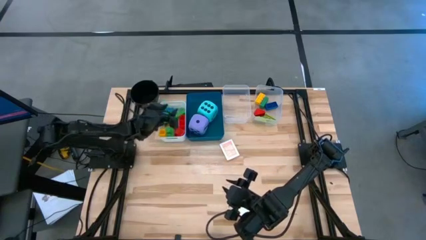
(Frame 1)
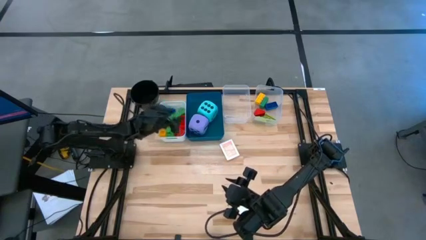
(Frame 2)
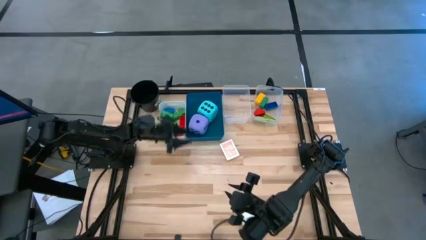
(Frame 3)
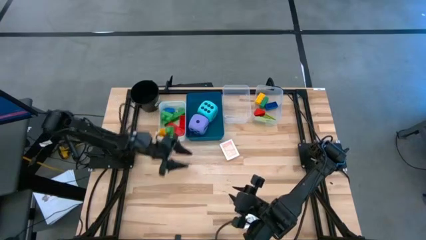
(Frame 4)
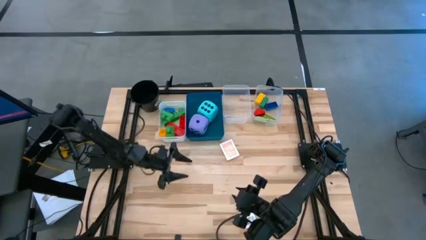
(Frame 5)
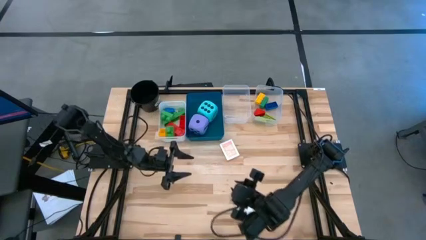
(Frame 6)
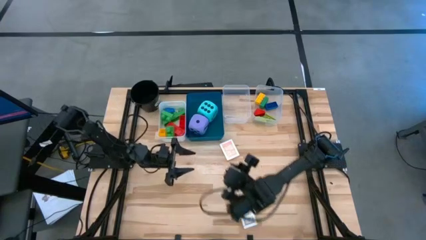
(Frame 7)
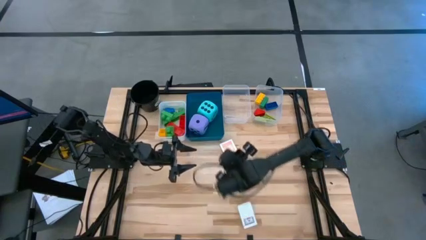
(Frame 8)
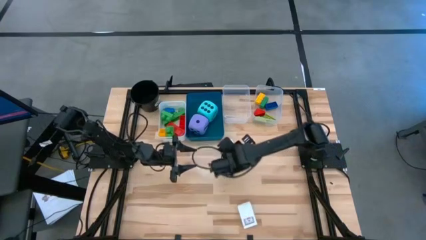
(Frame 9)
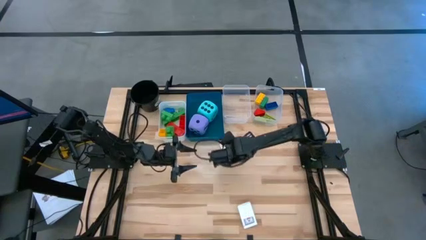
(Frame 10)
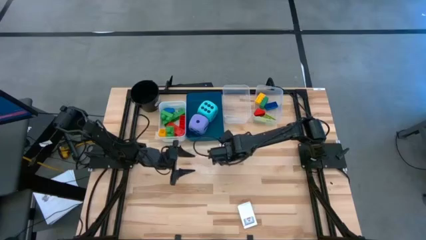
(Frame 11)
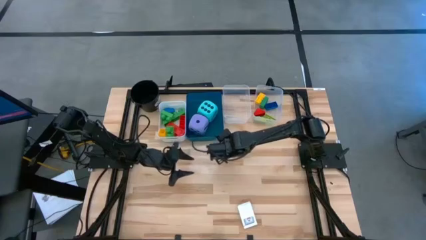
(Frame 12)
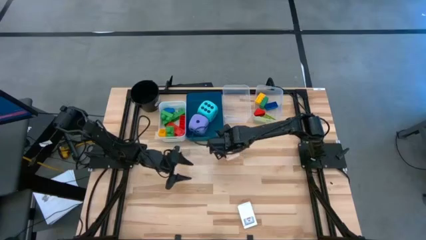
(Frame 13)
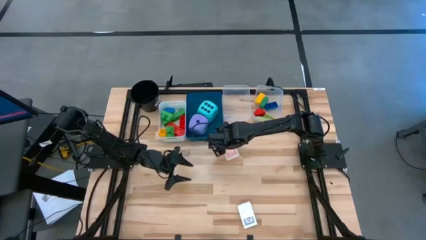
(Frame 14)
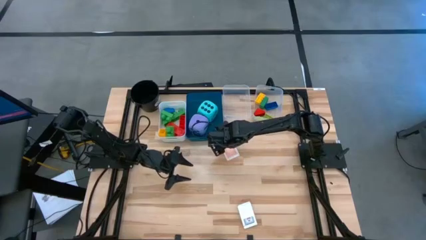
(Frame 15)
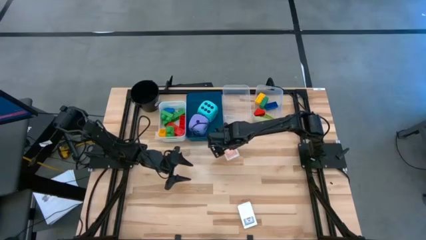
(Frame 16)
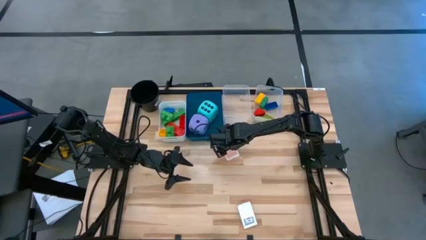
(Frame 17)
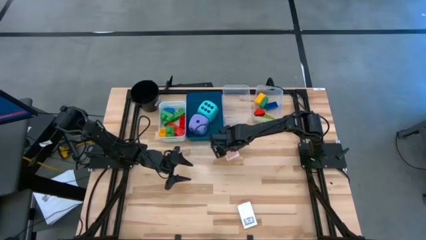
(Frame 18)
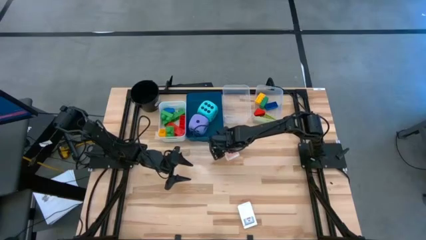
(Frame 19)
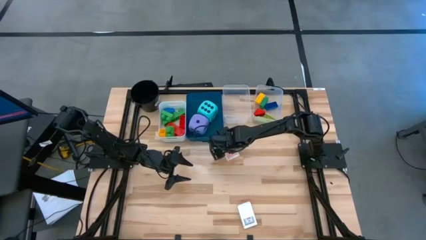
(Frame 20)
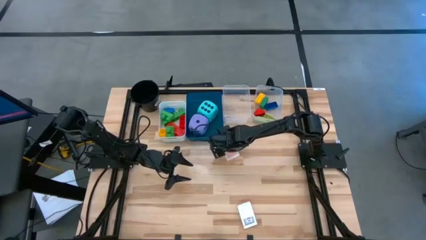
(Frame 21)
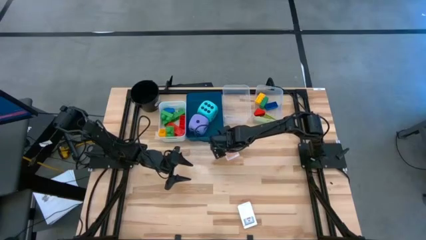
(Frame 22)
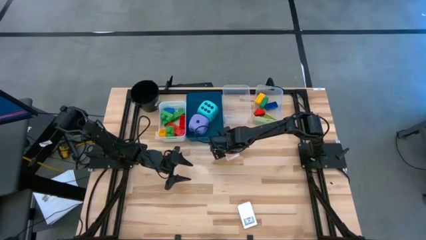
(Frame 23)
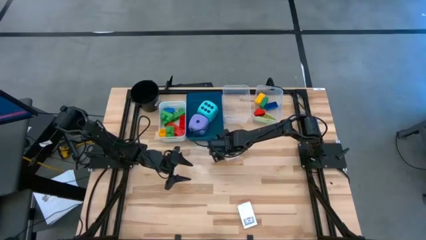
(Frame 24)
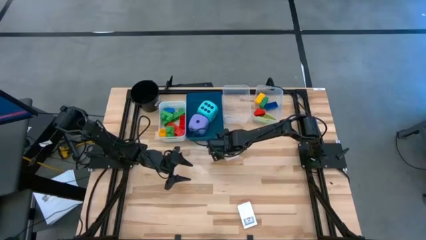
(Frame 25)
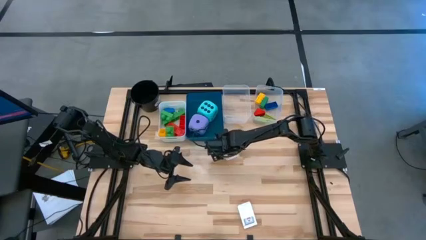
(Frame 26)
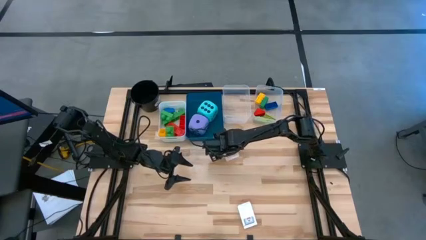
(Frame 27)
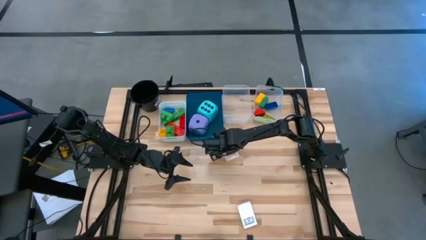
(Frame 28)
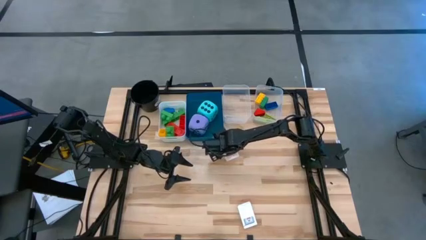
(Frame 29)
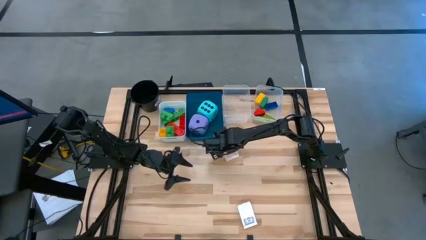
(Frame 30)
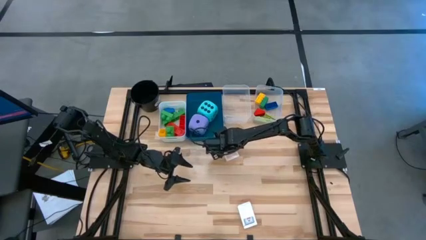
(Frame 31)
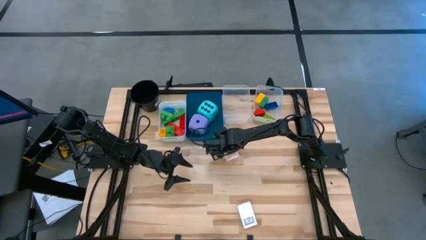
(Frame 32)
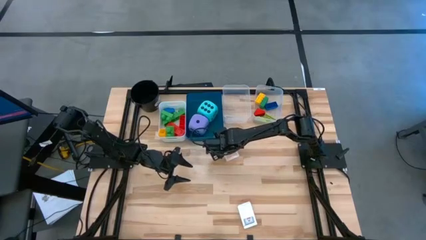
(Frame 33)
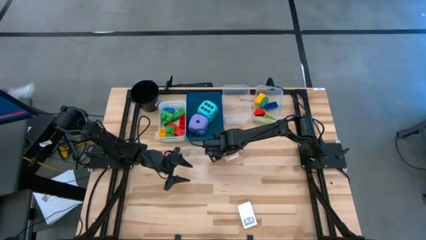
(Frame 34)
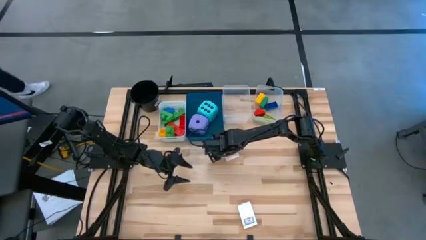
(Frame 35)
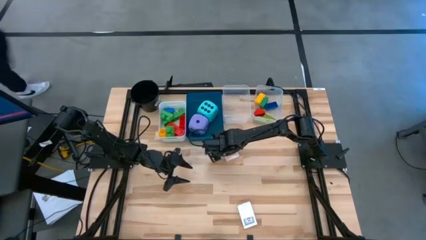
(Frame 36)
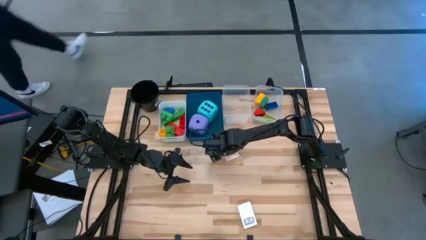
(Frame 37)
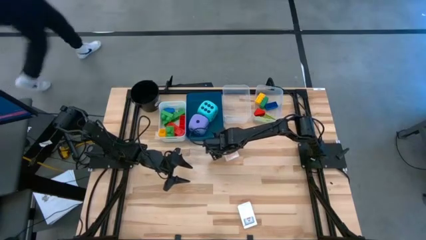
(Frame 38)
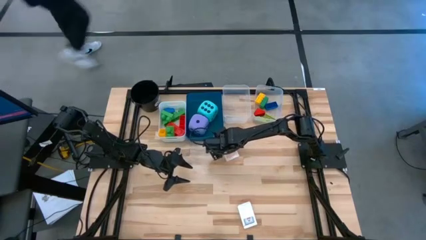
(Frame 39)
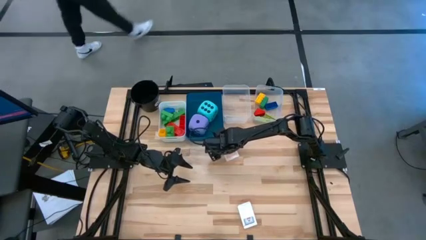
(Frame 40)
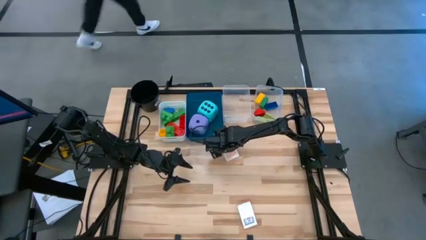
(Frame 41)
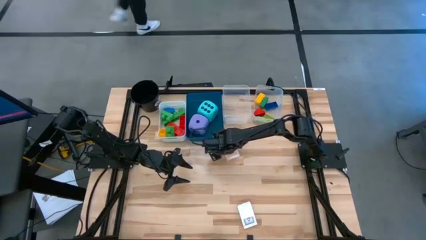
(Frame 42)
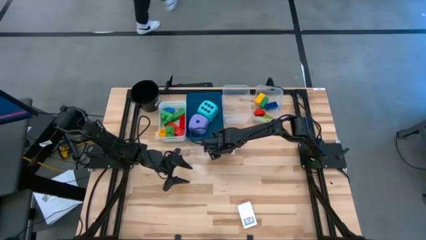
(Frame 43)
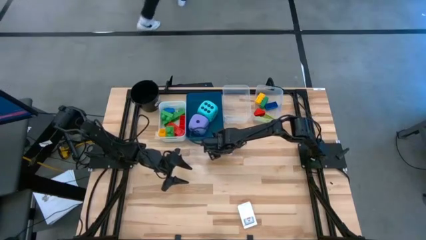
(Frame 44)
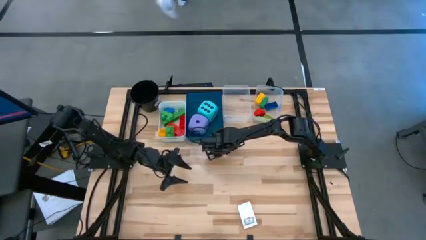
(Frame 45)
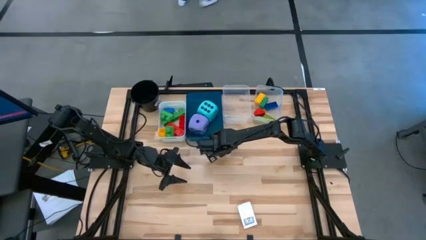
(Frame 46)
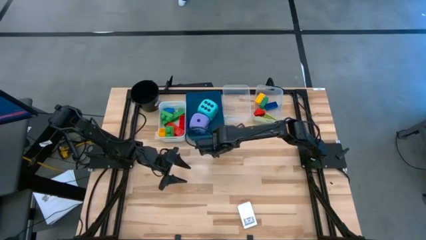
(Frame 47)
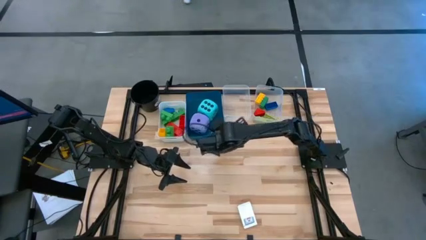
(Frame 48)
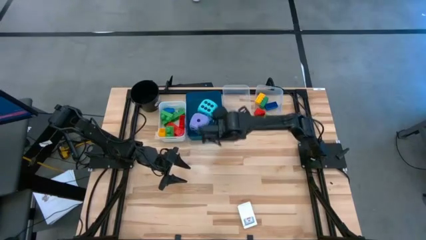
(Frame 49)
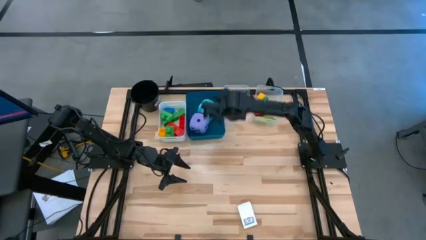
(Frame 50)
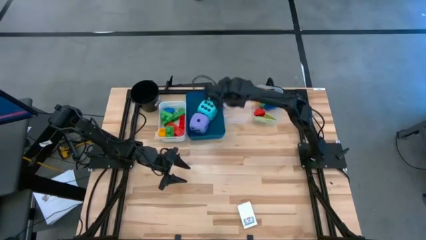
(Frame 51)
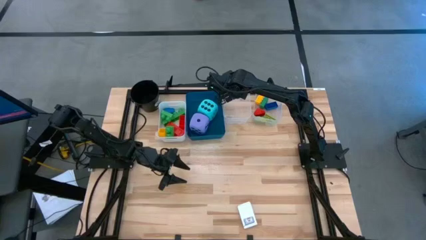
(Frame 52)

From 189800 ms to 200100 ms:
Task: Pick & Place Toys
Put the orange game card into the left transparent bin

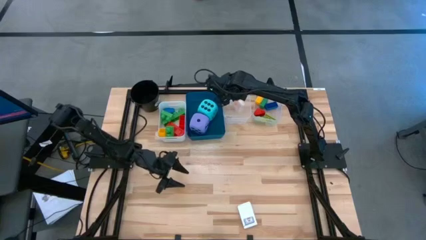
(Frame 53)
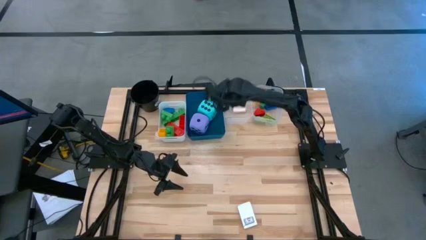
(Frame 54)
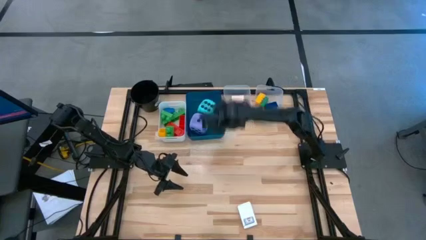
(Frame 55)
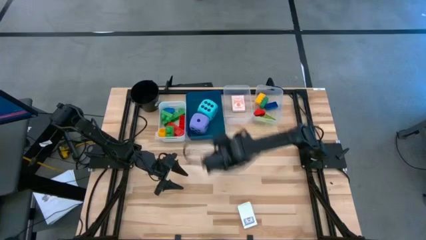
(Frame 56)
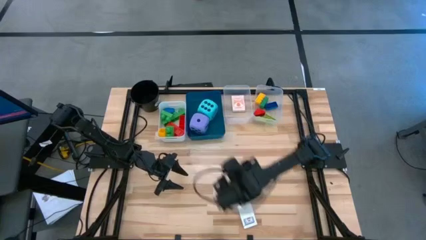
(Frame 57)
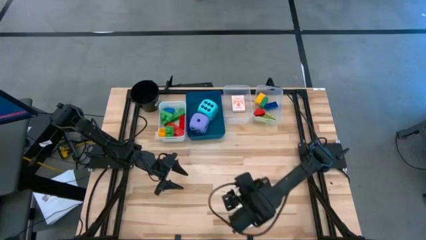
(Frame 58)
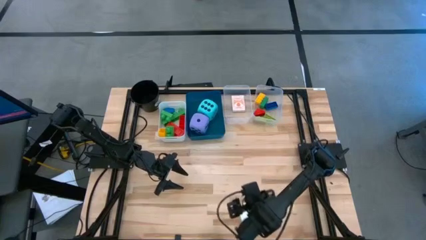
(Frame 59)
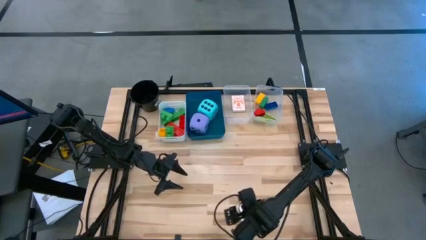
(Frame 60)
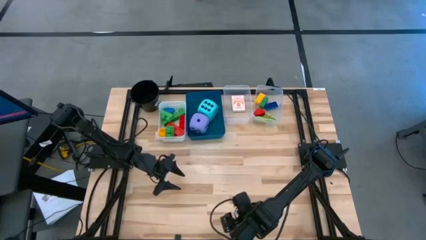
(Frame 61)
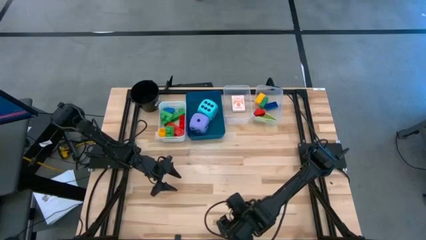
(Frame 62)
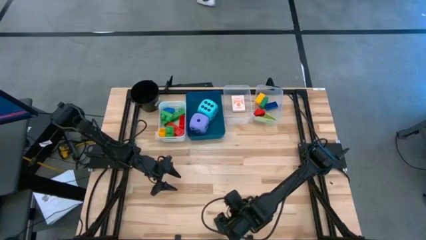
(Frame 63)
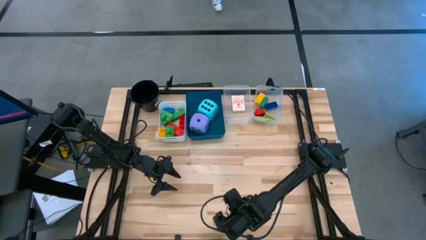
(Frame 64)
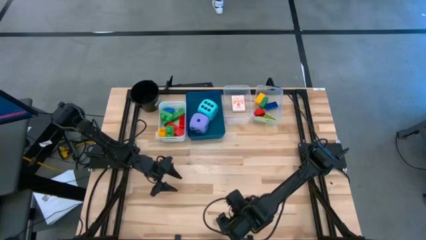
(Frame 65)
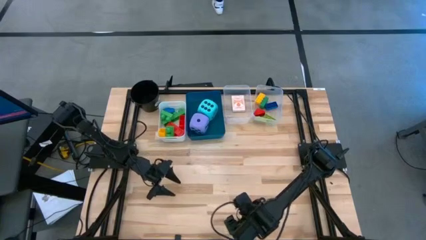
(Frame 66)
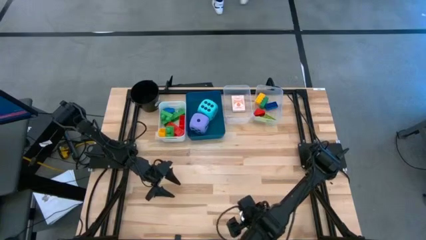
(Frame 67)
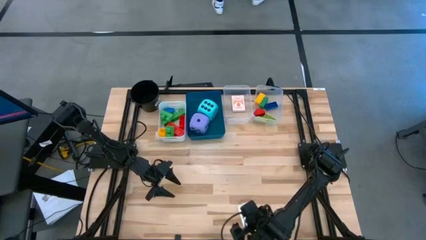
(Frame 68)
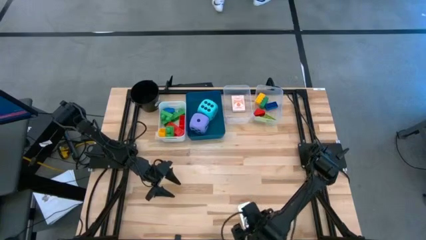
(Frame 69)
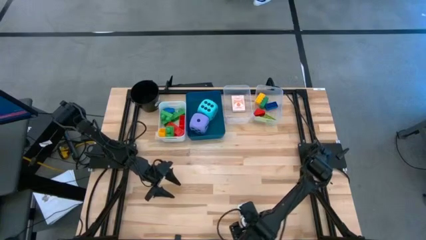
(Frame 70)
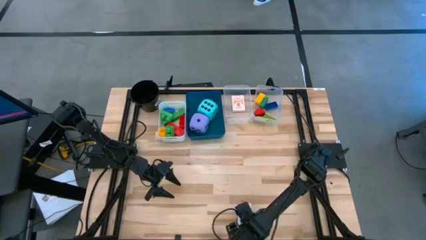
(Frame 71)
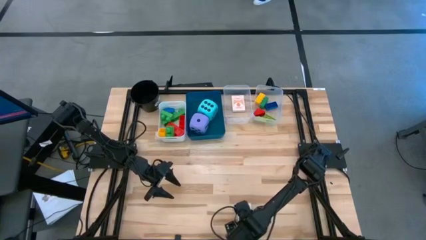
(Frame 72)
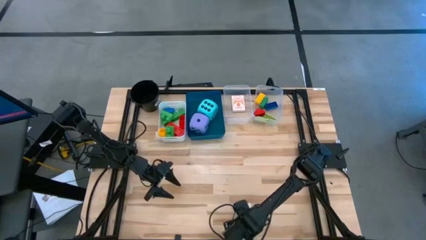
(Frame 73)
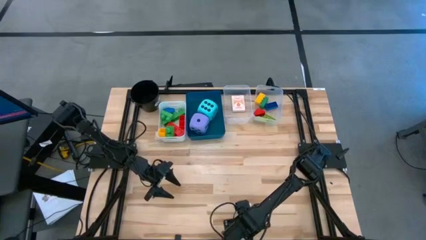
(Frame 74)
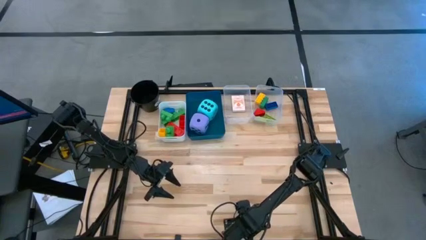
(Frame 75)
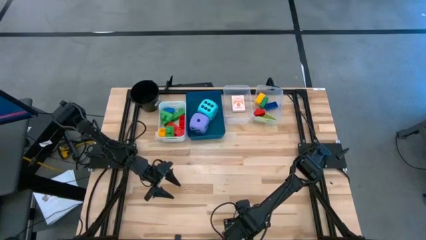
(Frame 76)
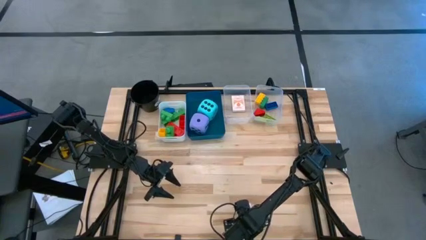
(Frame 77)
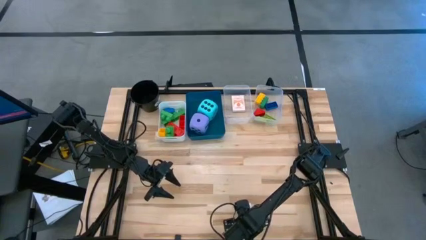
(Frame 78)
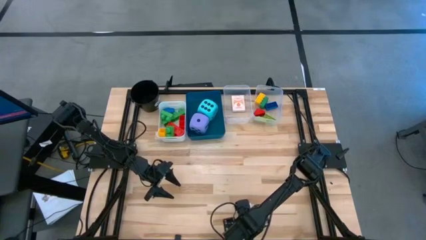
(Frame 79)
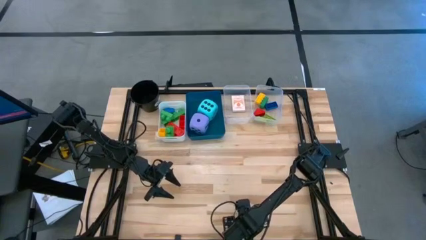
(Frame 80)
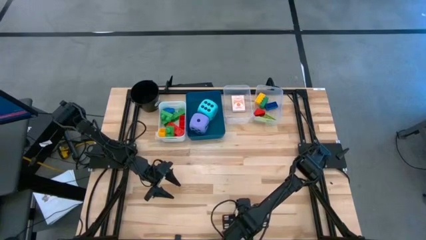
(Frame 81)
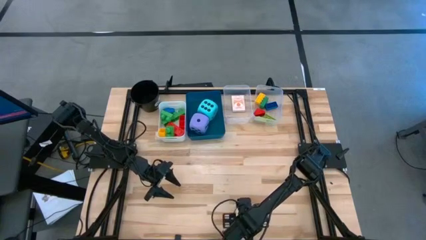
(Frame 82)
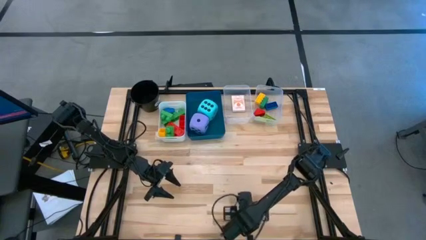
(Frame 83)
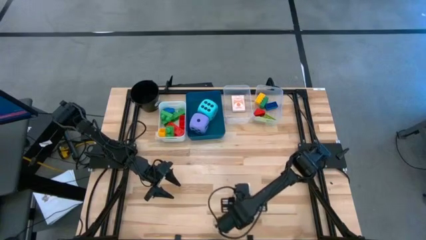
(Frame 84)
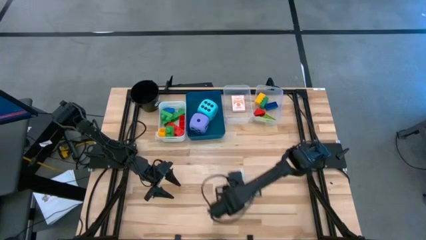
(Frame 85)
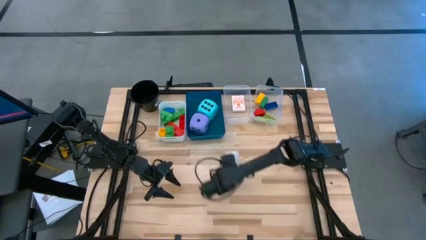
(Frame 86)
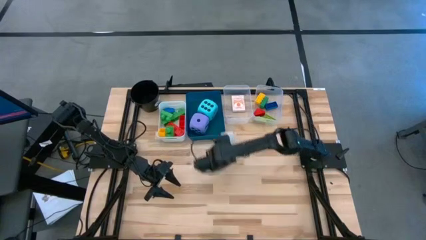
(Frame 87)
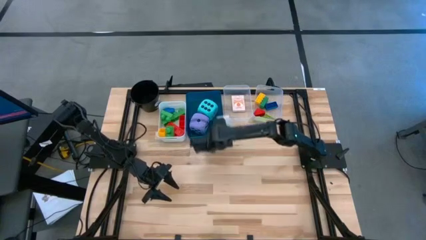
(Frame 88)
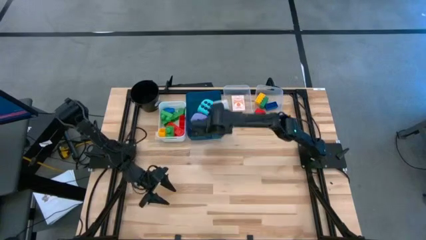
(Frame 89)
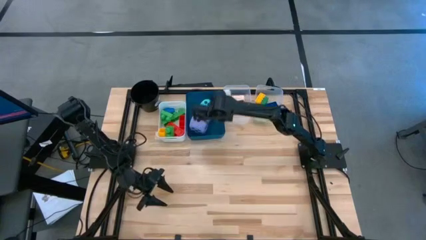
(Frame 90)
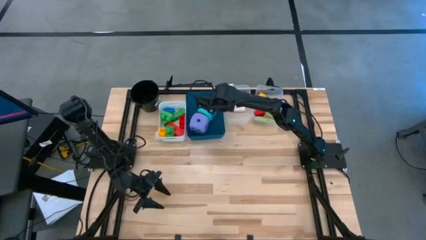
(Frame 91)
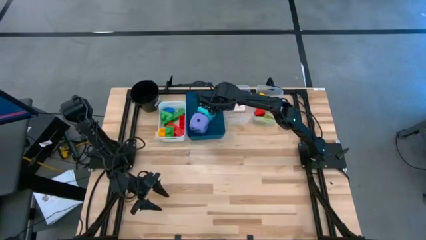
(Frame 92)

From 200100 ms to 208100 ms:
Put the white game card into the left transparent bin
